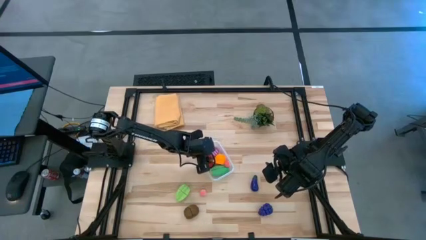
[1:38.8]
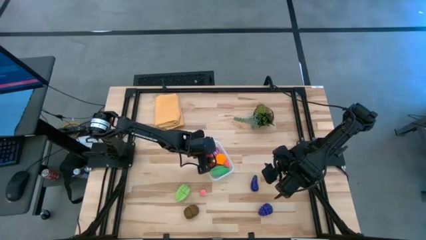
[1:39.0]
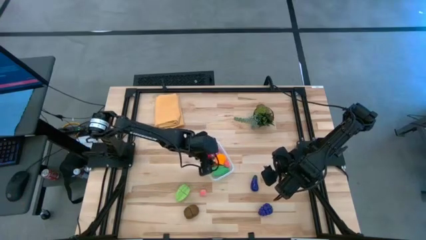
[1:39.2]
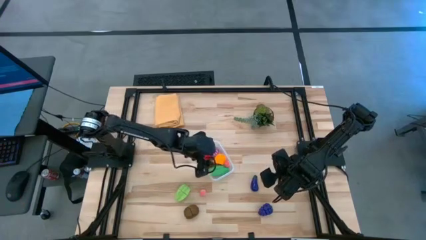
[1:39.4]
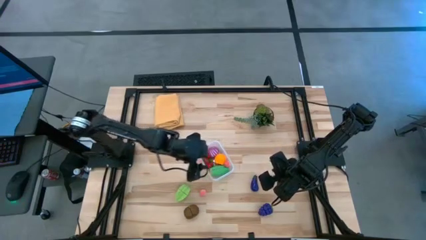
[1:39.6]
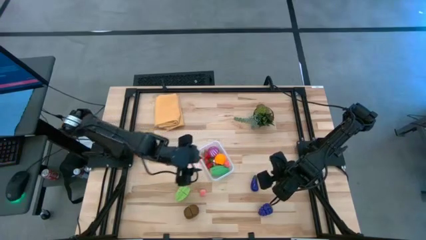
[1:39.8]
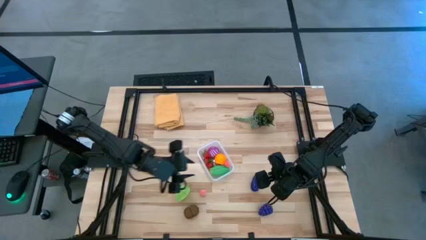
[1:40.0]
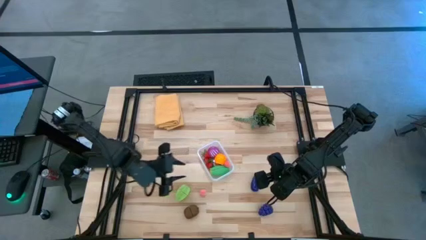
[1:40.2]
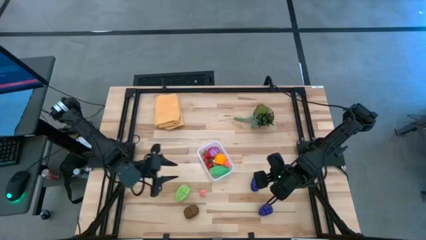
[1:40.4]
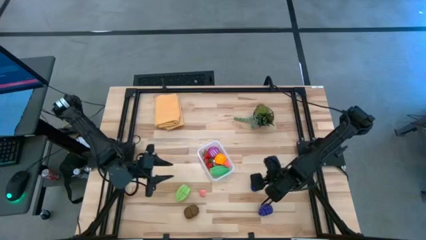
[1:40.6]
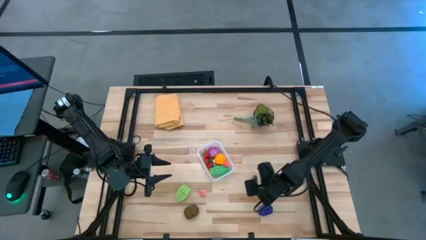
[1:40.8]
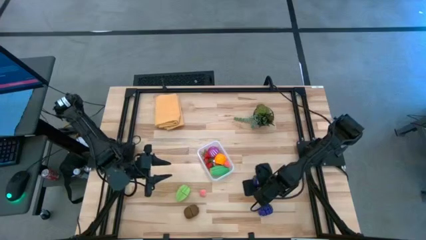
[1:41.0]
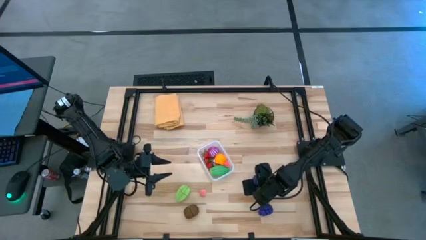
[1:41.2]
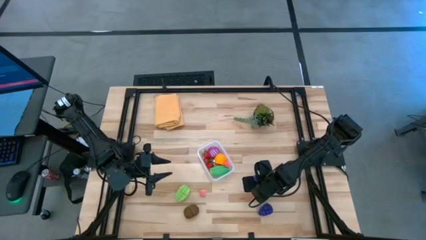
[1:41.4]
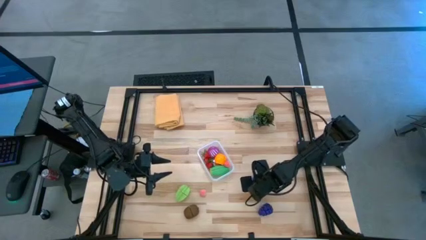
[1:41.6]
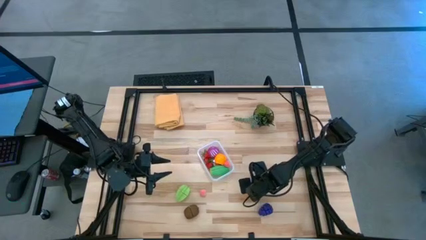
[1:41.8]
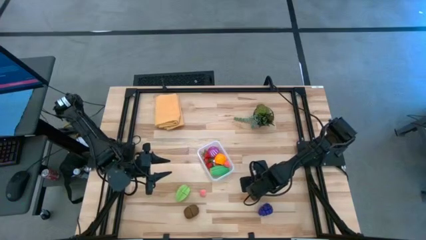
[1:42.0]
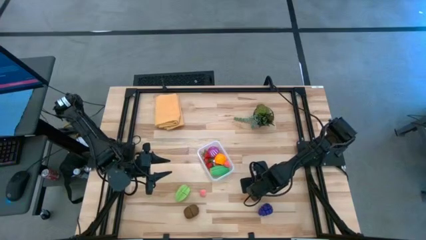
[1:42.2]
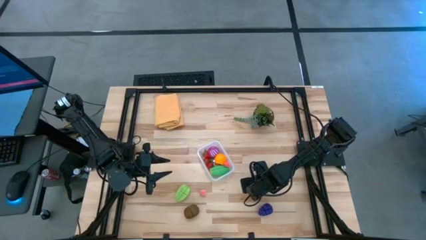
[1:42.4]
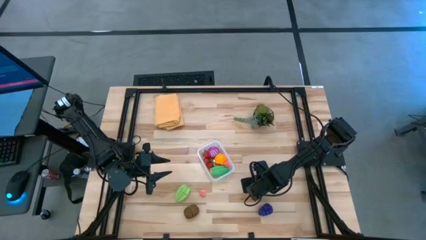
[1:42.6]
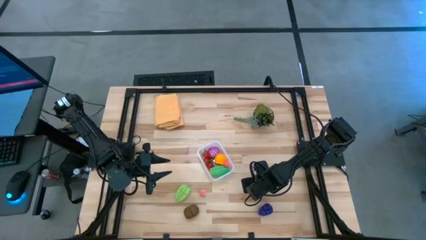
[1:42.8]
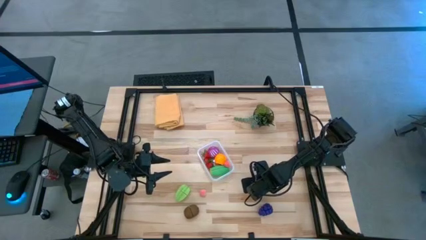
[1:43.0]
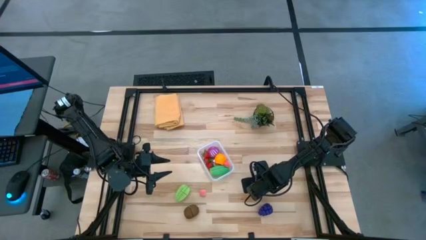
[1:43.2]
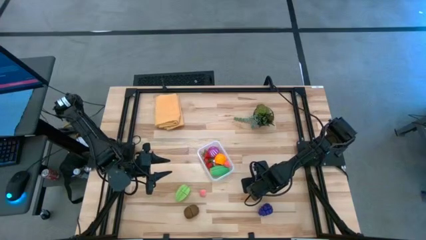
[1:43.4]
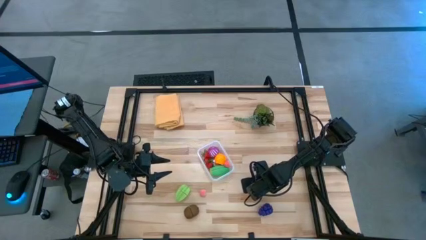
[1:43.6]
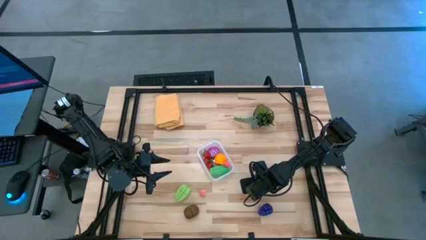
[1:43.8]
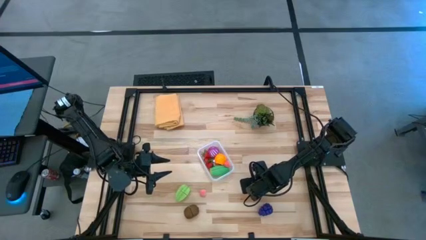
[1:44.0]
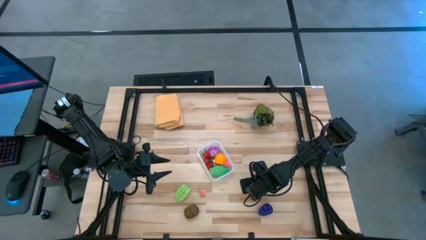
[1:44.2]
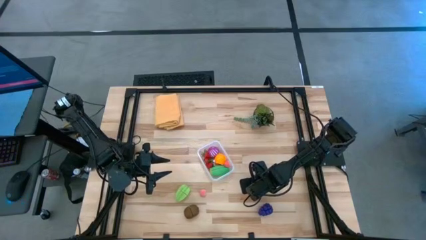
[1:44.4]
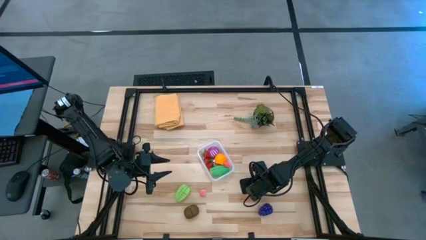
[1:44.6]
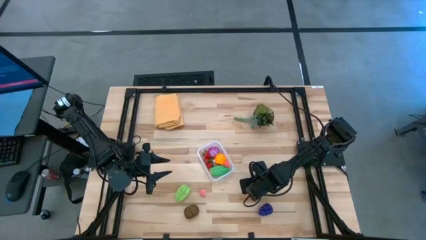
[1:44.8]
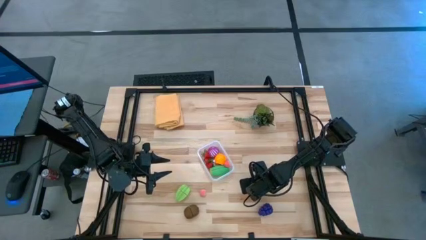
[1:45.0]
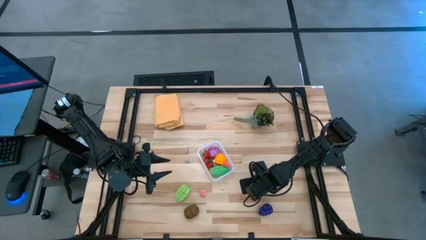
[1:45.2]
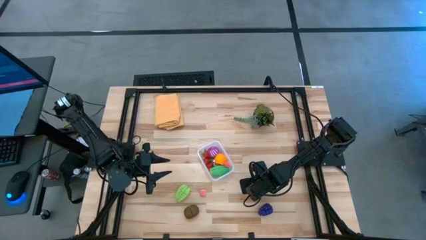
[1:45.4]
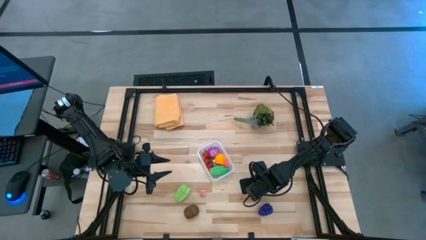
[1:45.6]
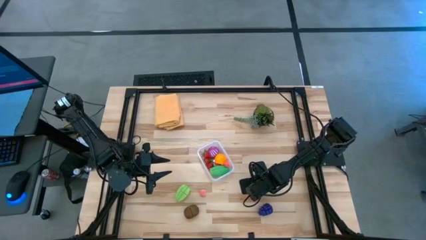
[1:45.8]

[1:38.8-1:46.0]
Task: Pick and placing Produce into tupperware
Put the purple eggplant into the transparent bin

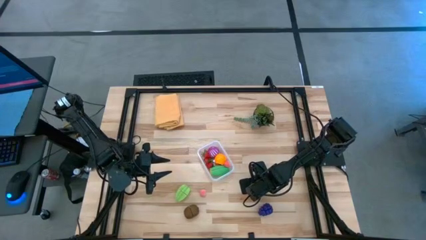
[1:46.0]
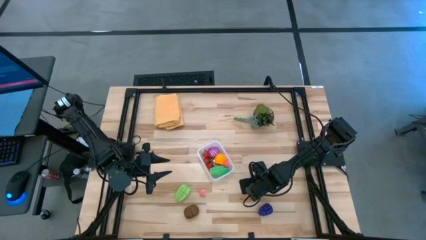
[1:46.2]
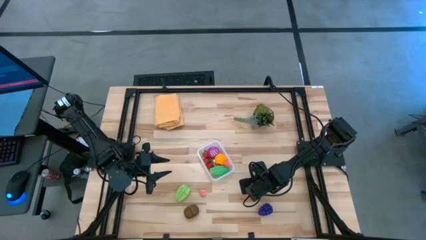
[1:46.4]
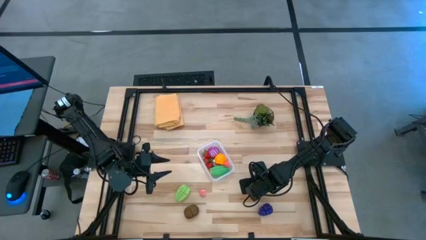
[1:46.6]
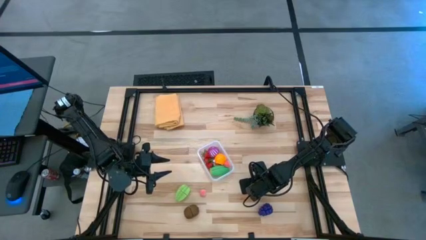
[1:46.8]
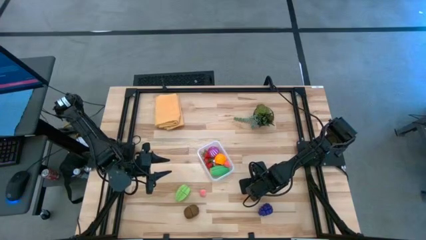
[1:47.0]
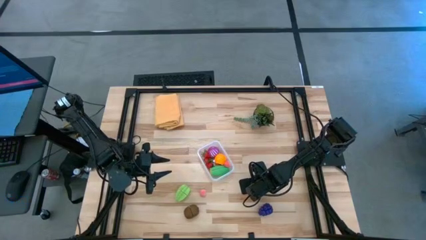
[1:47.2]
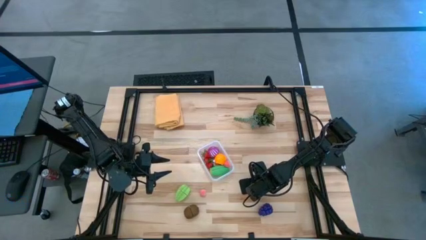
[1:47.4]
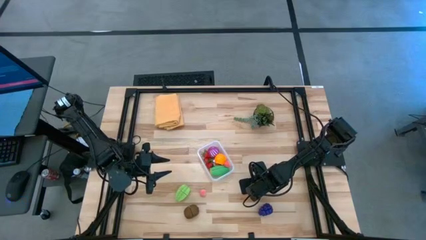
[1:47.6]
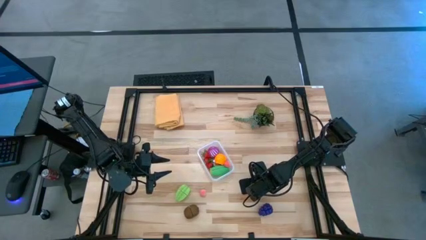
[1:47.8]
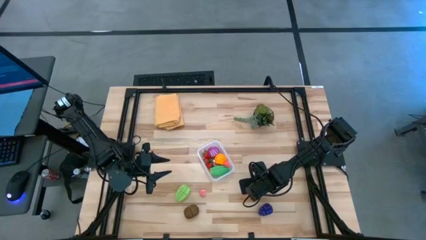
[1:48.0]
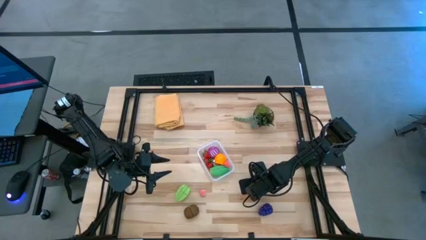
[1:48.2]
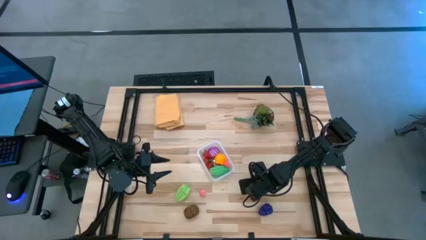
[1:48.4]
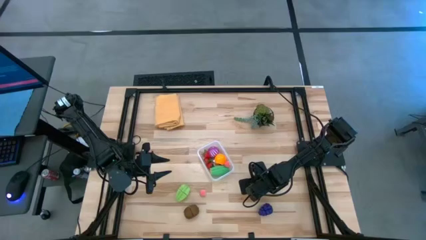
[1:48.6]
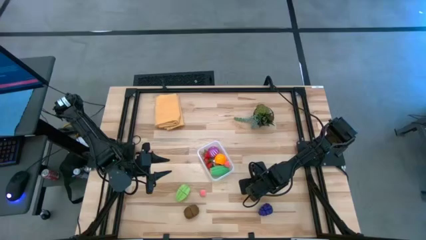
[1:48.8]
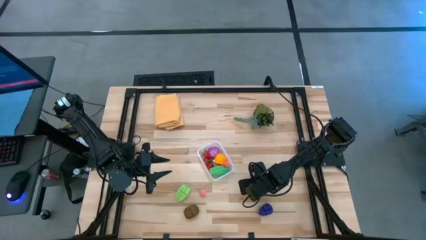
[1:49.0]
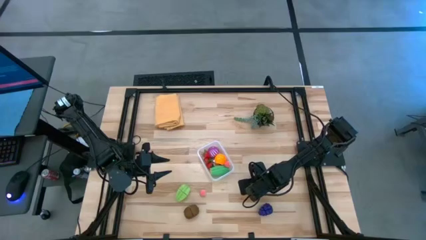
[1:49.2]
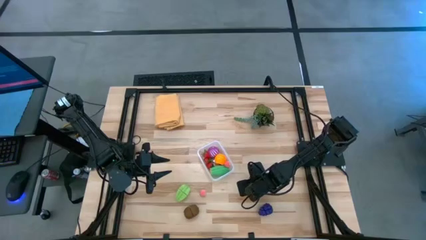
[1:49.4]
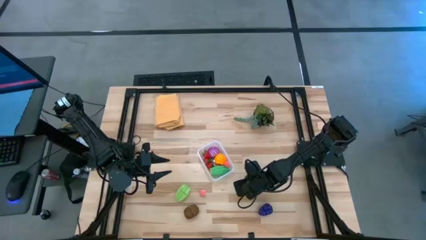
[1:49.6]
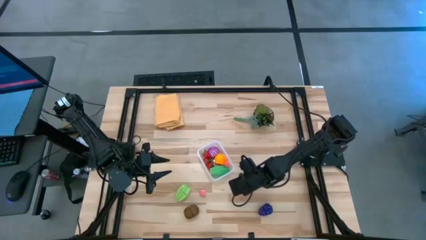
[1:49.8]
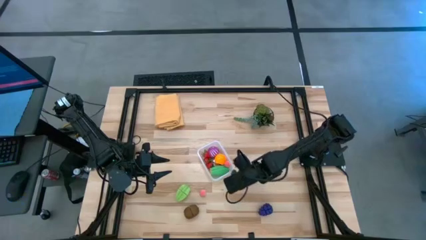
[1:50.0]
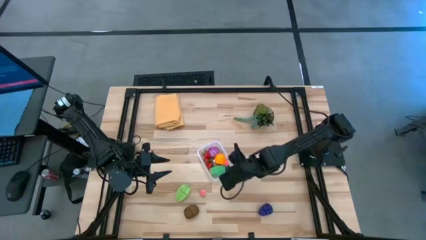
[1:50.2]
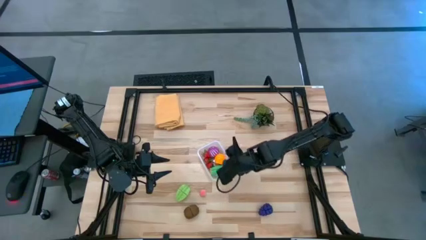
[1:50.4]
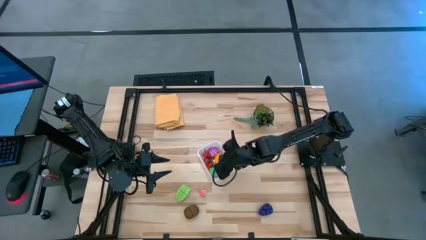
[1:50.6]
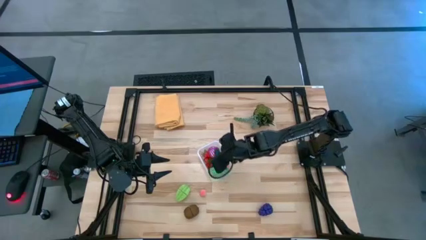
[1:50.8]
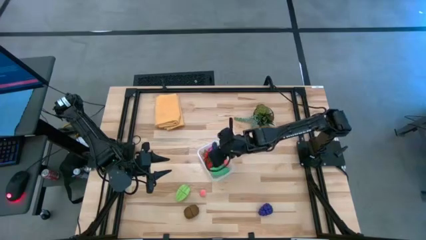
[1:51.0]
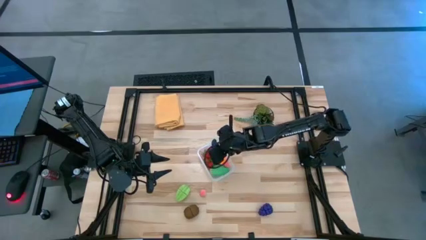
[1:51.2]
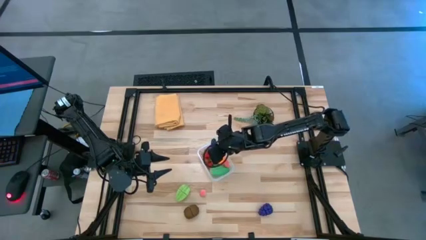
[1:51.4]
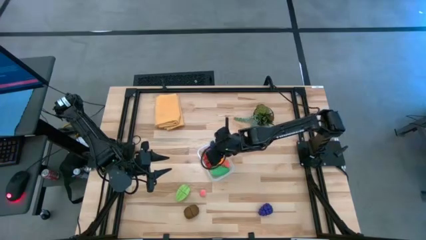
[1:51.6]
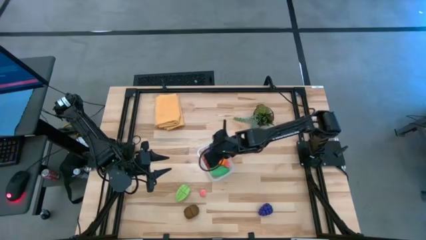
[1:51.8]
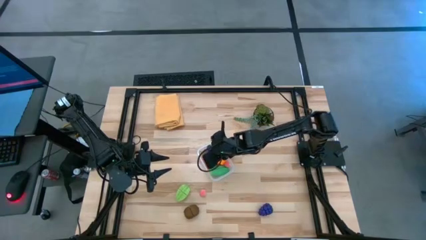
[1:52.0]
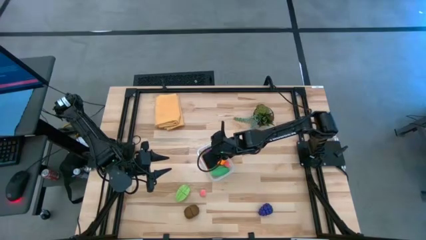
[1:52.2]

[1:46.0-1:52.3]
Put the violet eggplant into the transparent bin
